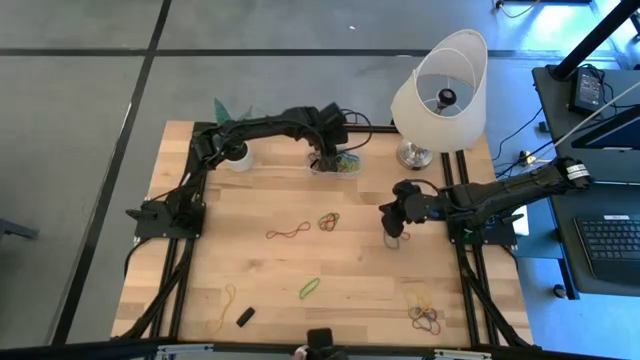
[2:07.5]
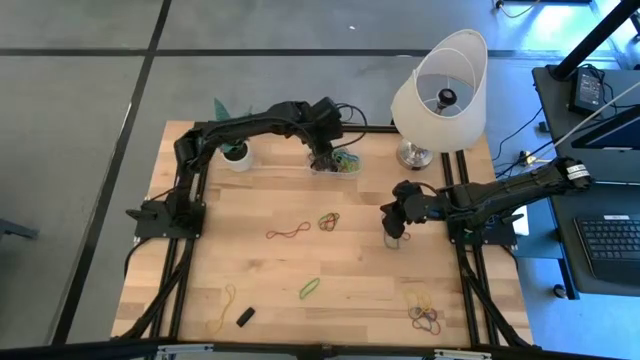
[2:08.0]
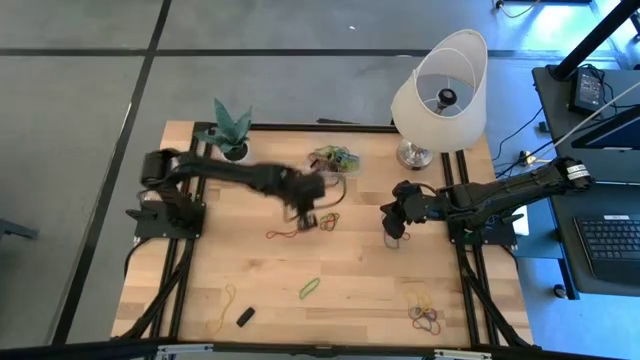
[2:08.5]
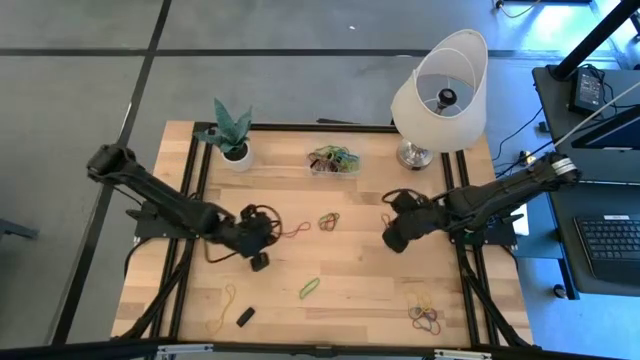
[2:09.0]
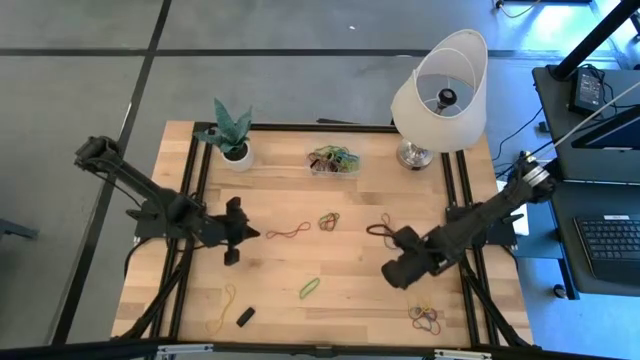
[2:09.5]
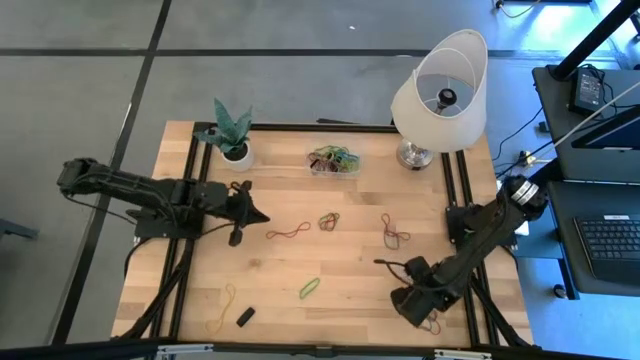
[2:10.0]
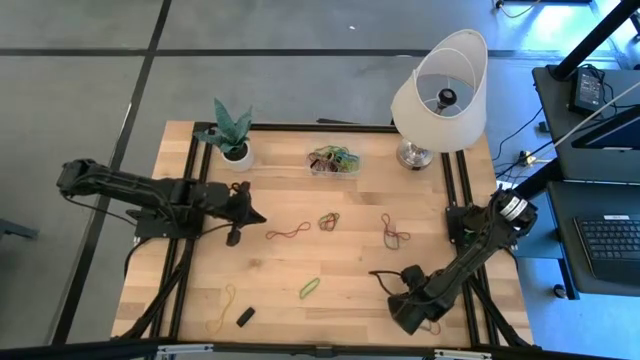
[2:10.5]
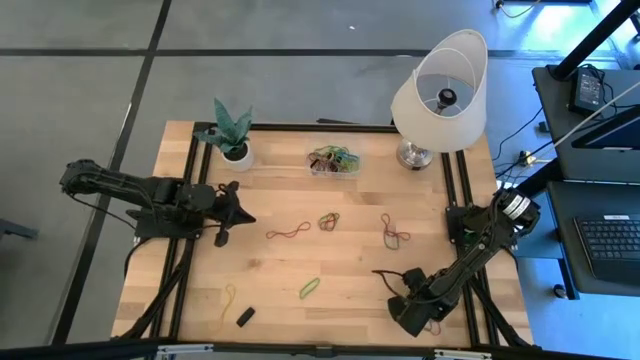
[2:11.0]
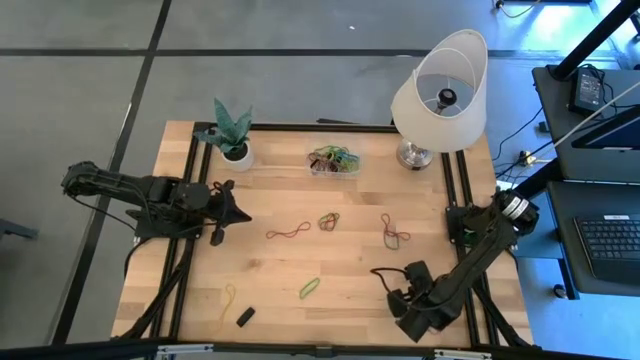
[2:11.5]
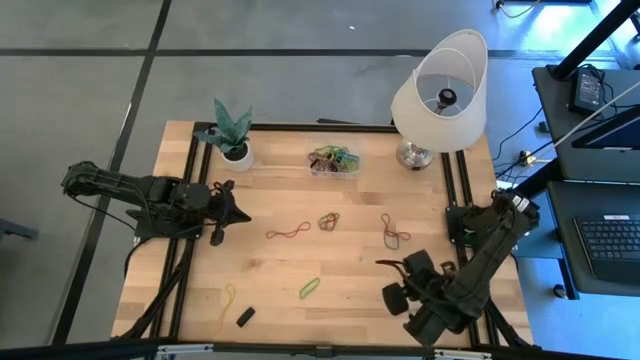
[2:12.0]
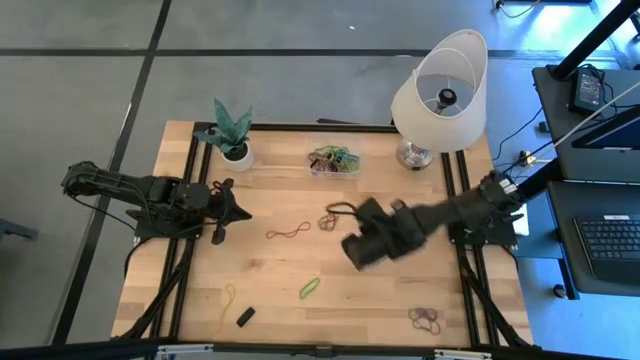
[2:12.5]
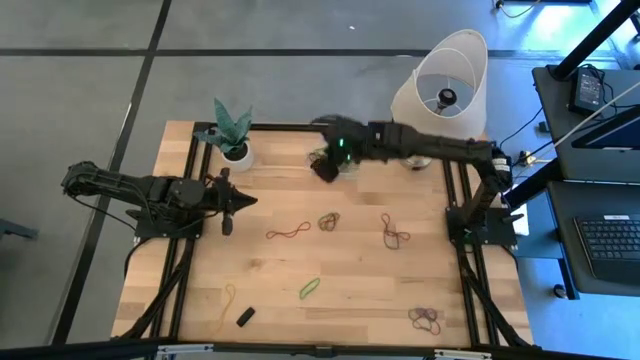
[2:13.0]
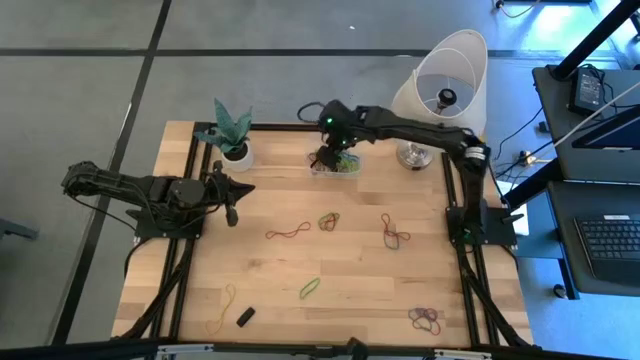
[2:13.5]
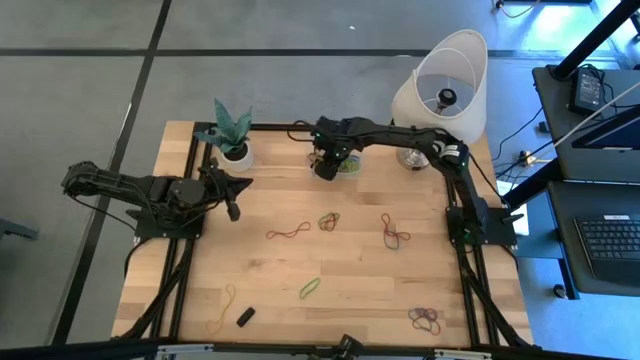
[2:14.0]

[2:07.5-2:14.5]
Task: Pick and place rubber bands into bin
Put the yellow rubber band into the transparent bin

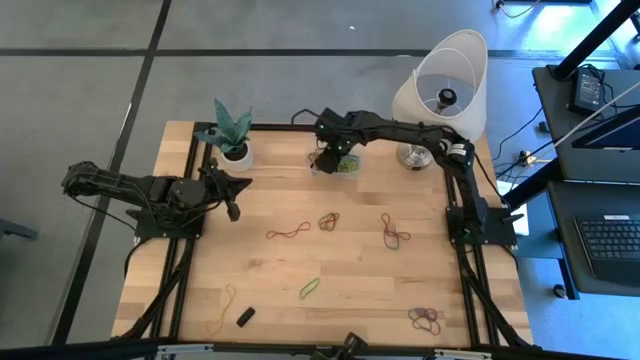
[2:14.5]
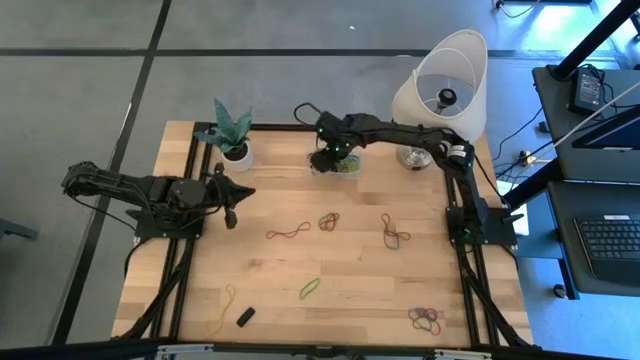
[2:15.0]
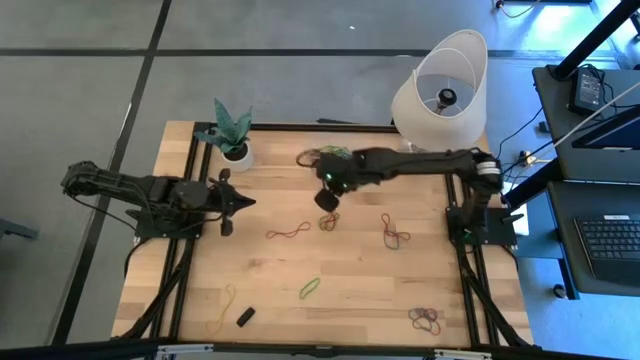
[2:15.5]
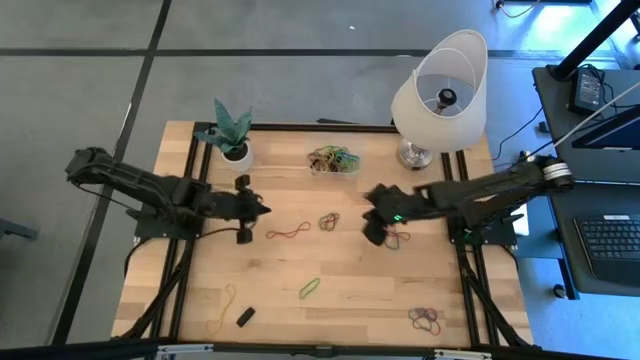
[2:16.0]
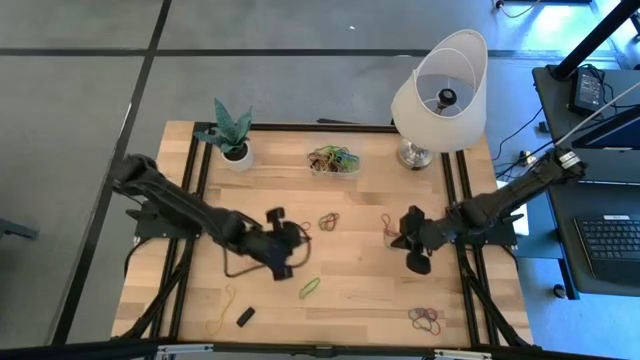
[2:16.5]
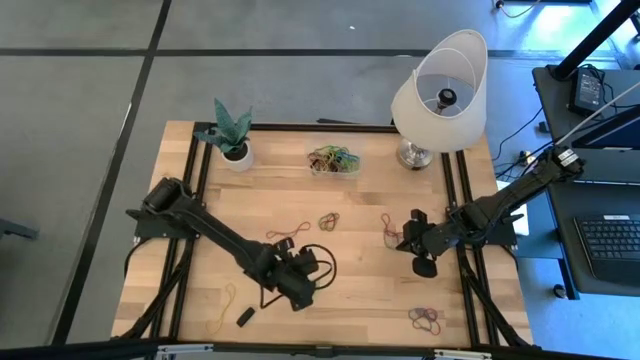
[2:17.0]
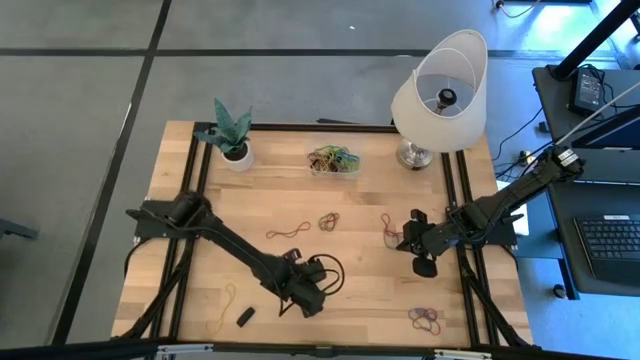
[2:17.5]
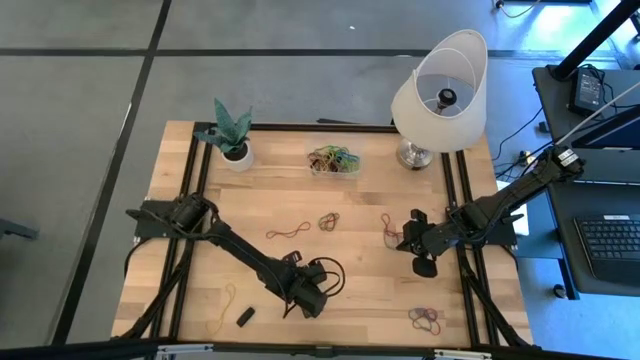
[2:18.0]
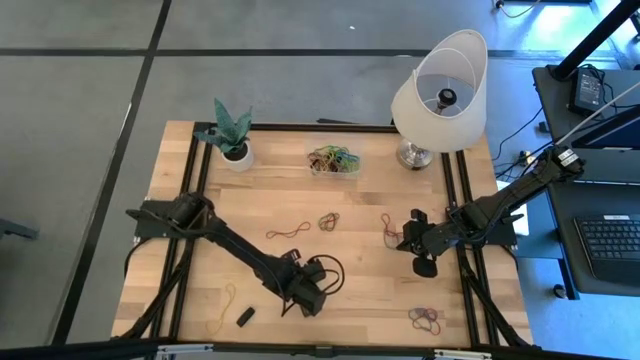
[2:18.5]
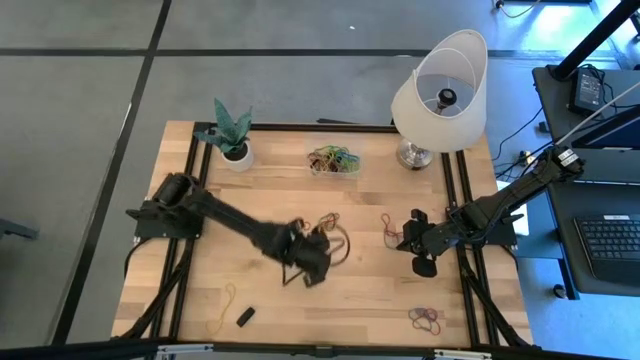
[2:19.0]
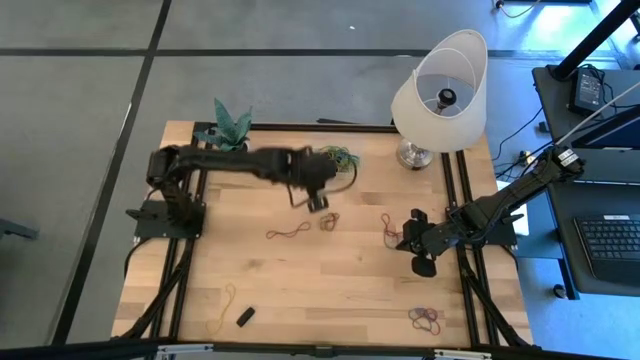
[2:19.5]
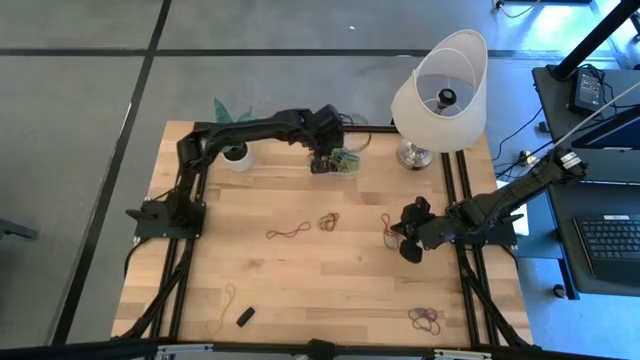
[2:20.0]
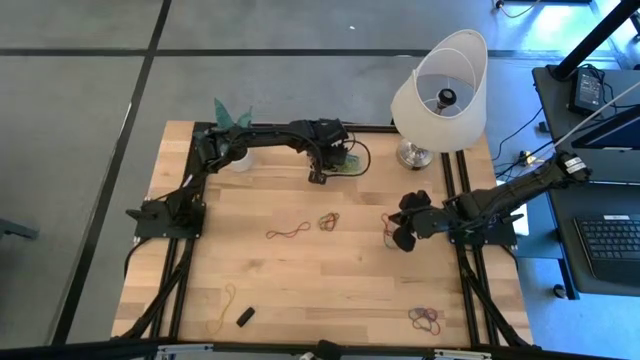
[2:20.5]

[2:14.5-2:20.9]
Put the green rubber band into the transparent bin

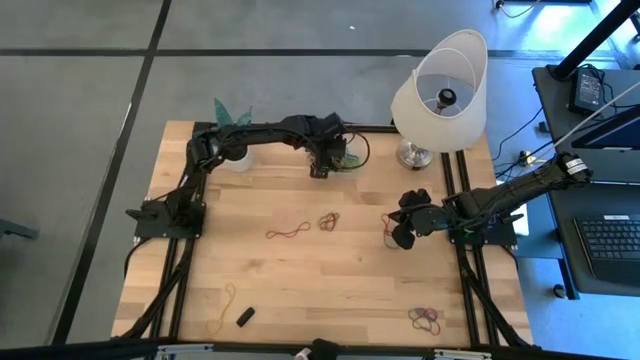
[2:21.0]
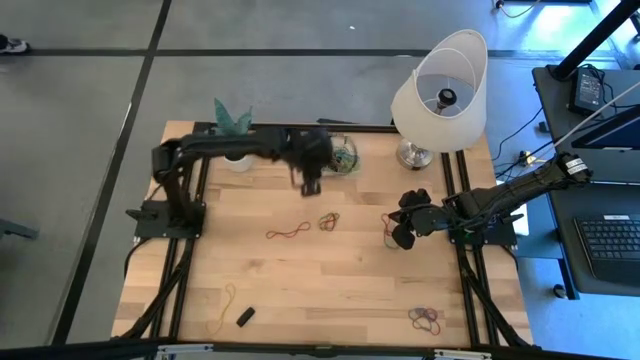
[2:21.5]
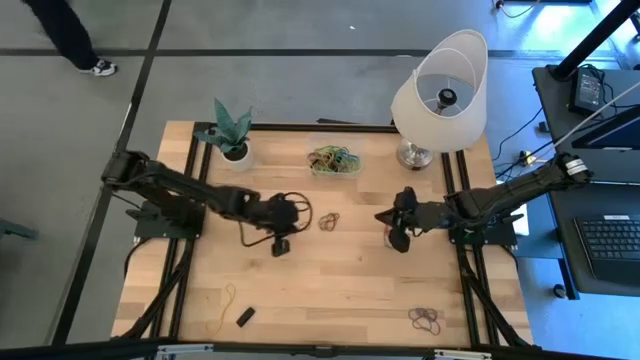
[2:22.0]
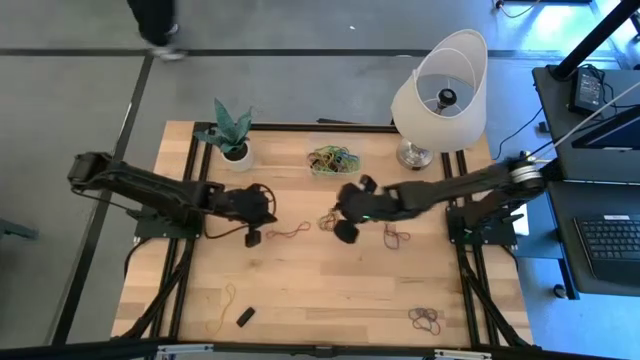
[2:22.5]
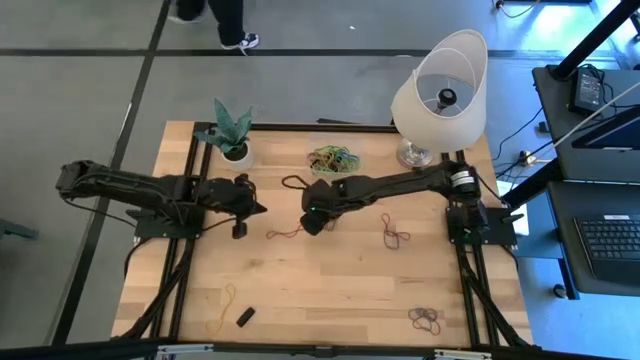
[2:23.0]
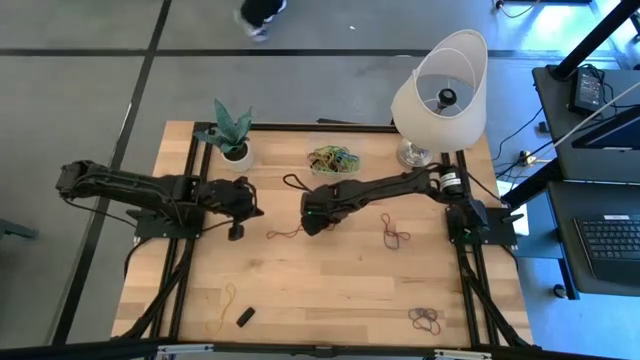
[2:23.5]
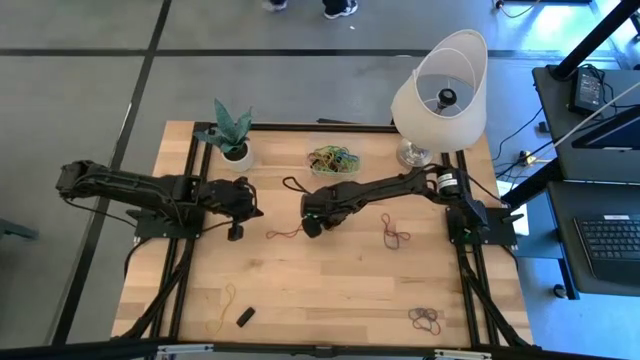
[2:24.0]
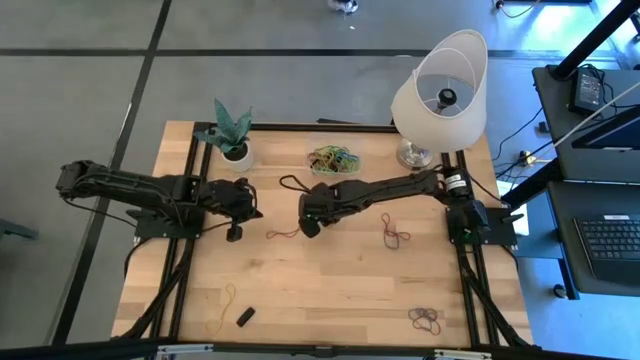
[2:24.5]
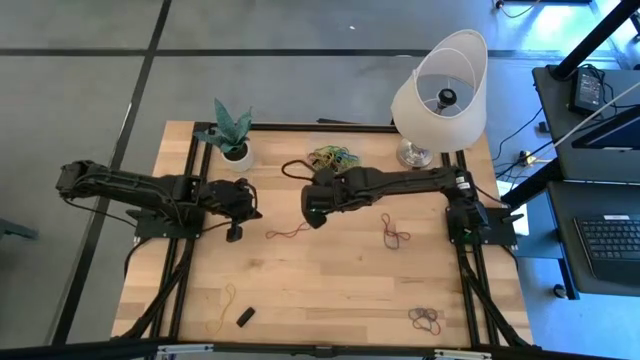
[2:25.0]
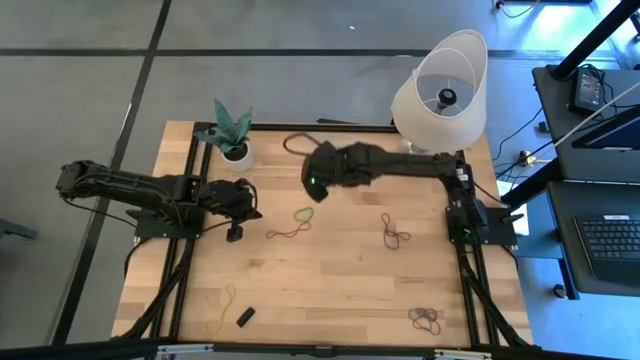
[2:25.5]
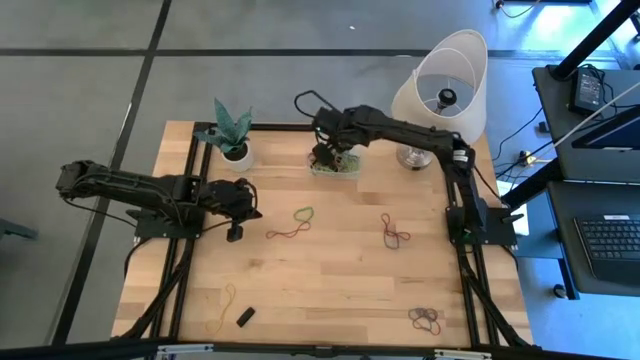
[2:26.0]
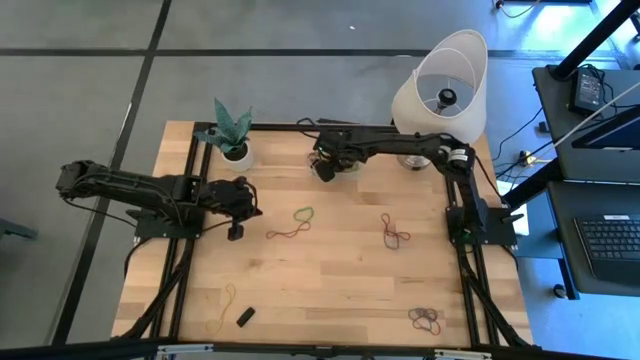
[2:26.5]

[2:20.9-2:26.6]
Put the red rubber band into the transparent bin

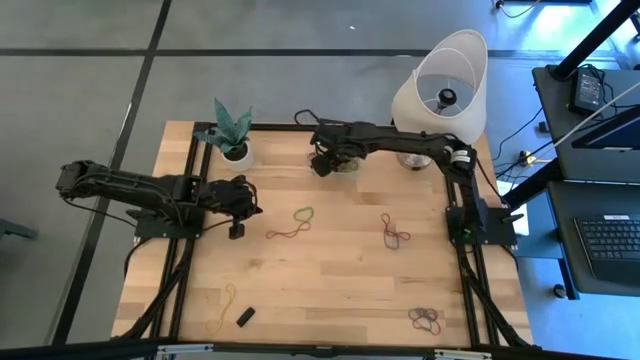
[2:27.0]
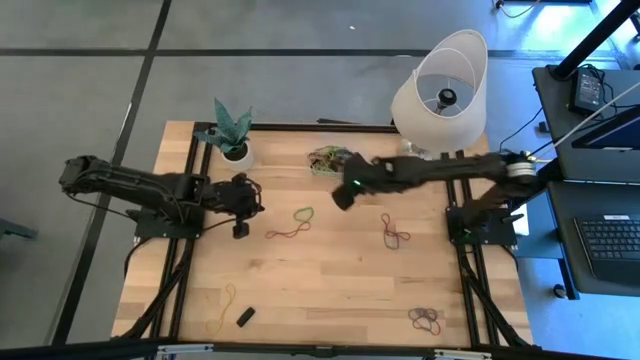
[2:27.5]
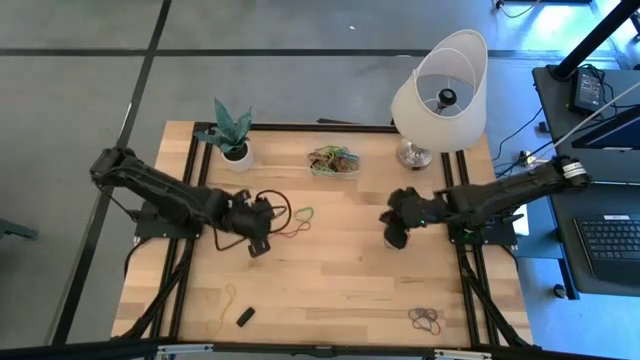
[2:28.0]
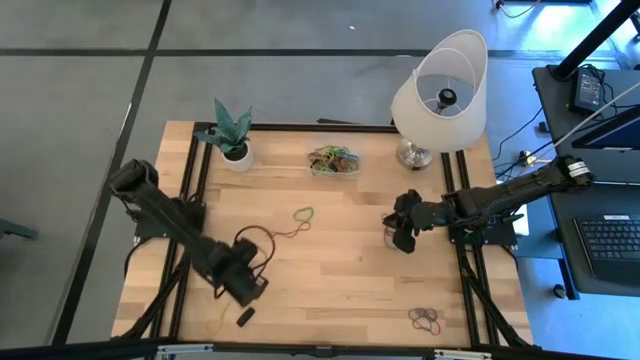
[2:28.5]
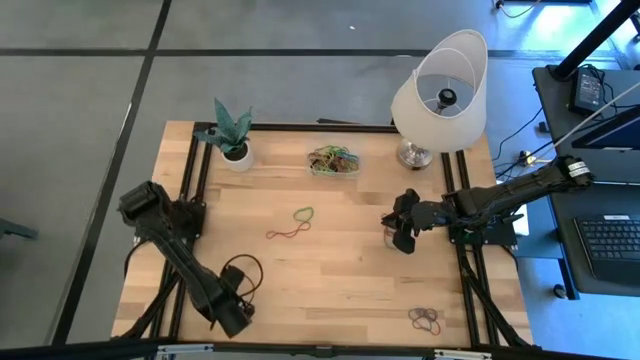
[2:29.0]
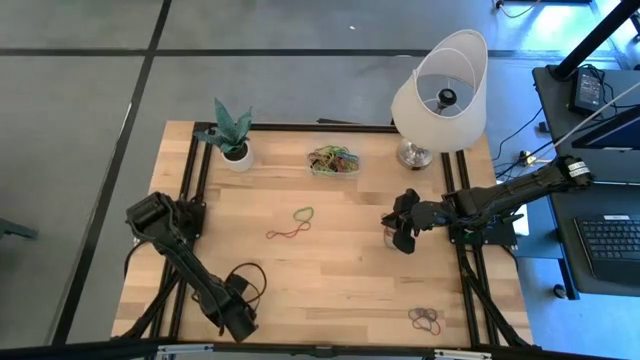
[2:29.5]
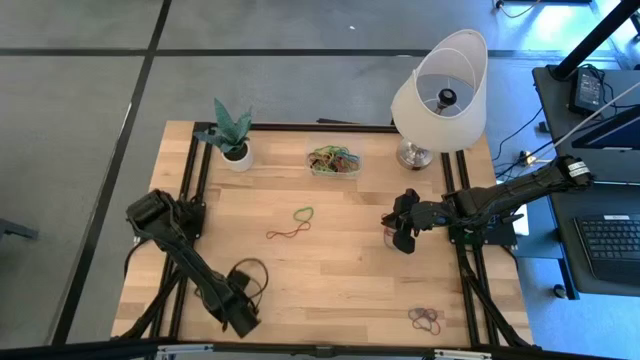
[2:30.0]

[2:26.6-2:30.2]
Put the yellow rubber band into the transparent bin
